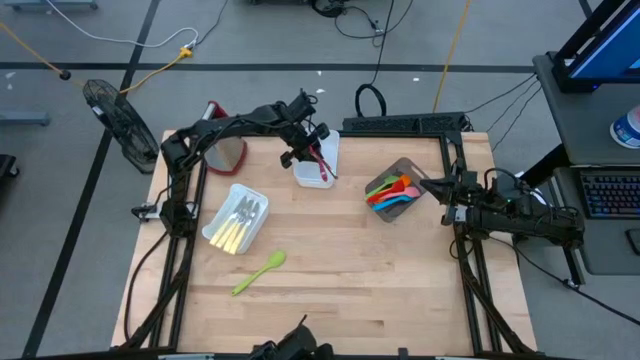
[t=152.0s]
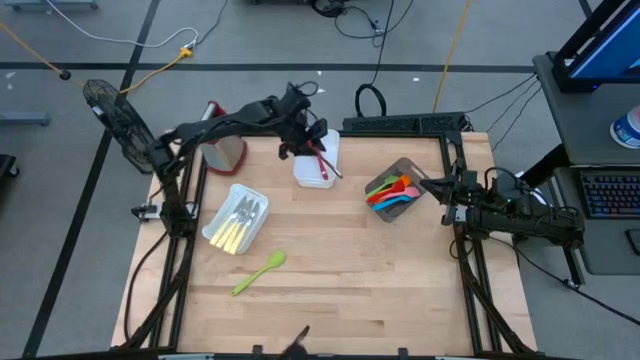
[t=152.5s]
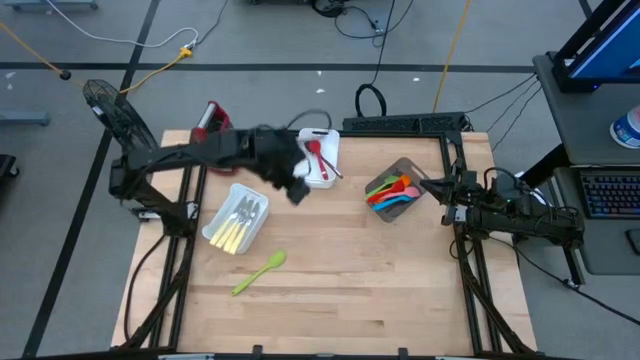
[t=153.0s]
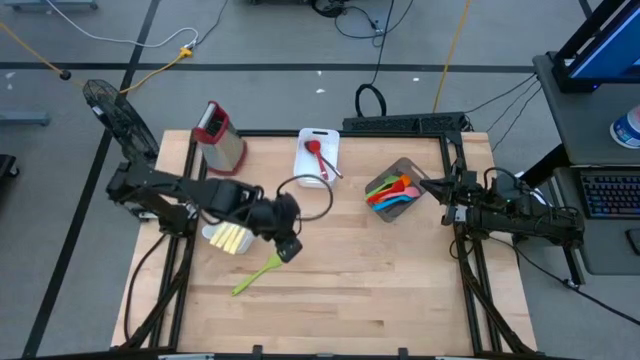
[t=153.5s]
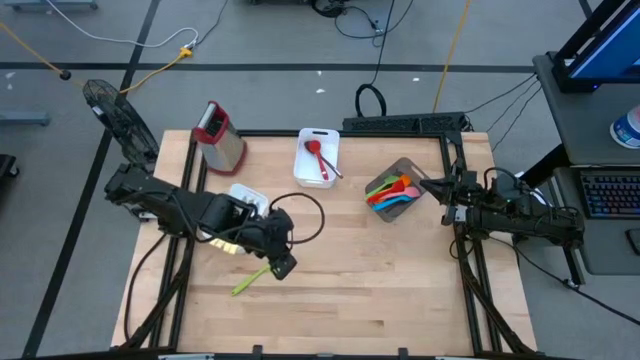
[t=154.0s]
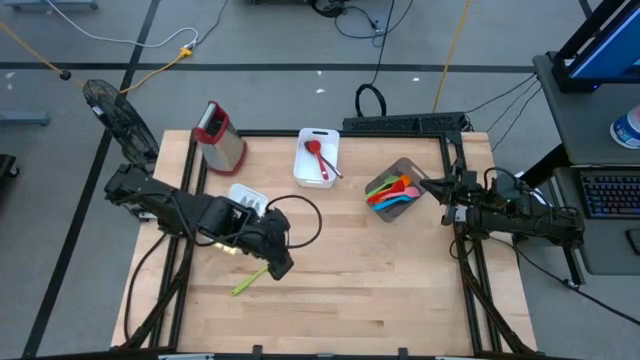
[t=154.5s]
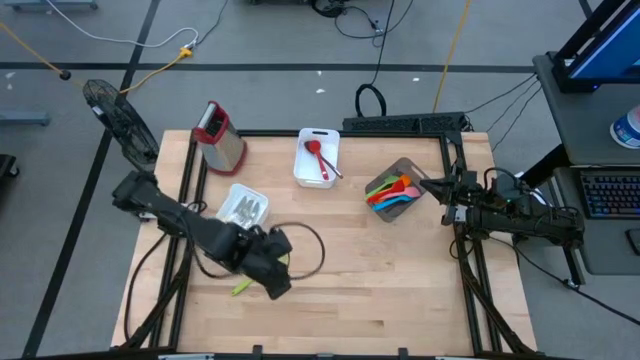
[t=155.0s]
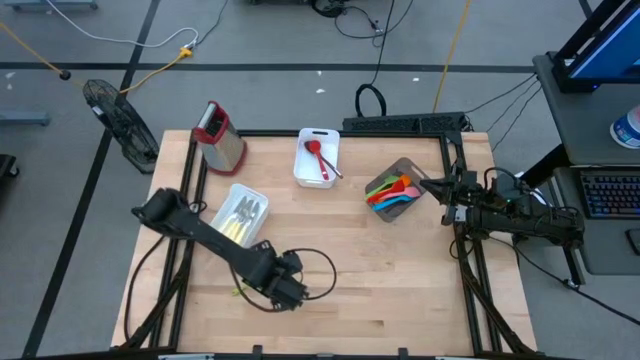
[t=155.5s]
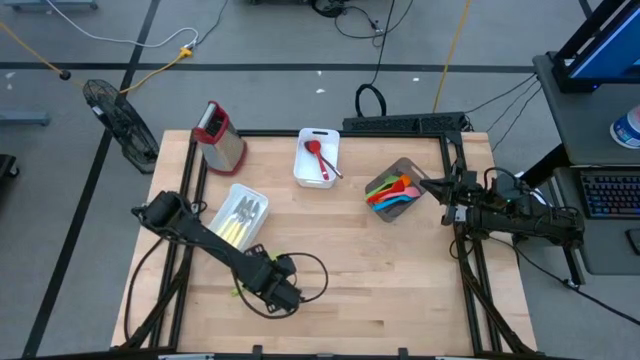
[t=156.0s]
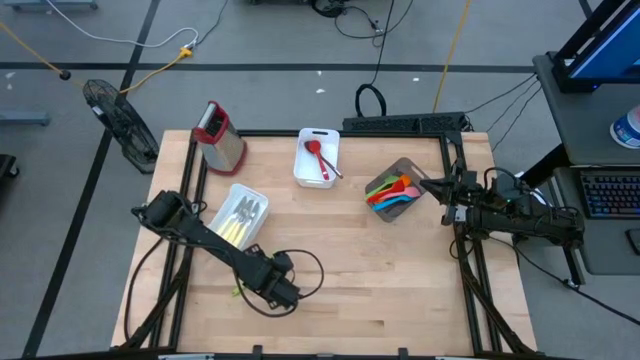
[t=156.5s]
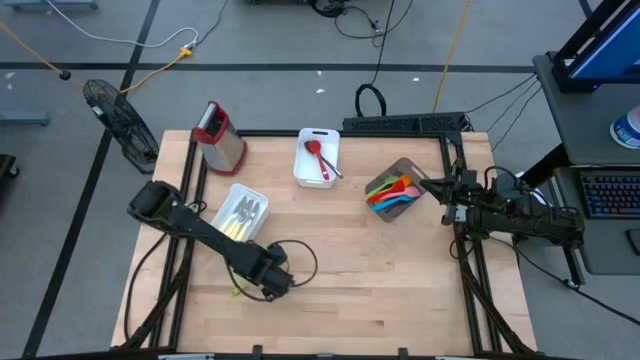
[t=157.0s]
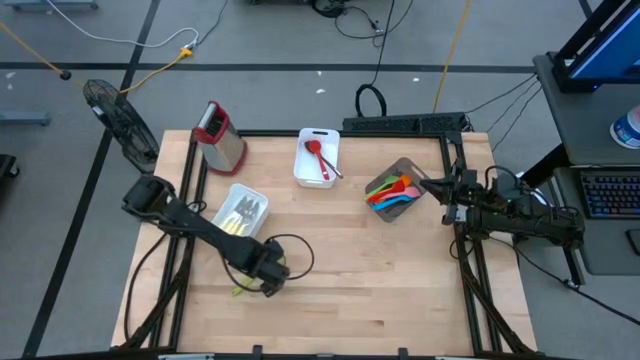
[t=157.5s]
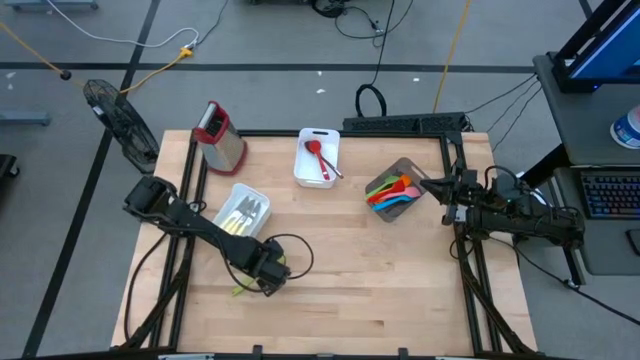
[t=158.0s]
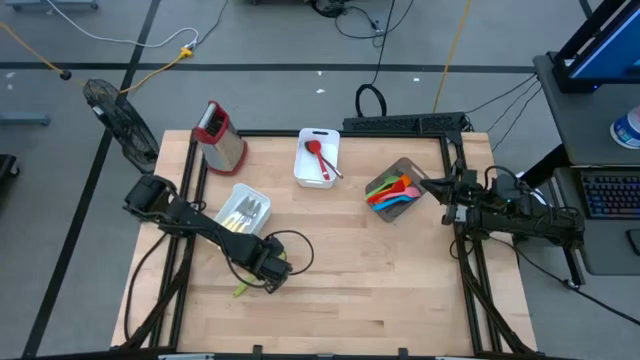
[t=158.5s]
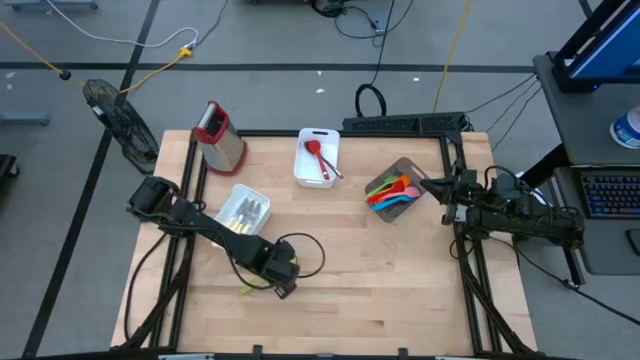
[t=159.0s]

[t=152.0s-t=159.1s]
Task: Pick & Place Kitchen Items
Put the green serving spoon into the top white bin

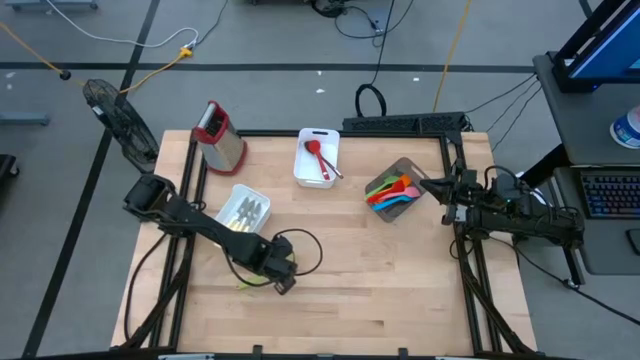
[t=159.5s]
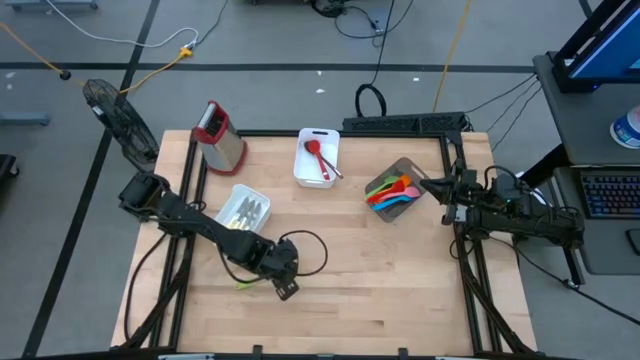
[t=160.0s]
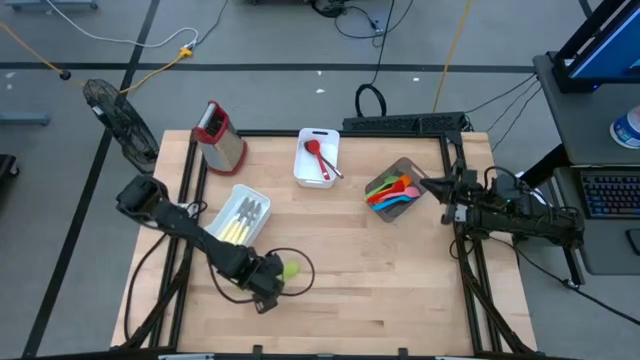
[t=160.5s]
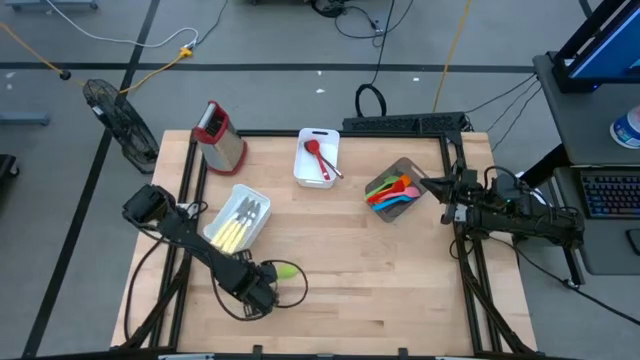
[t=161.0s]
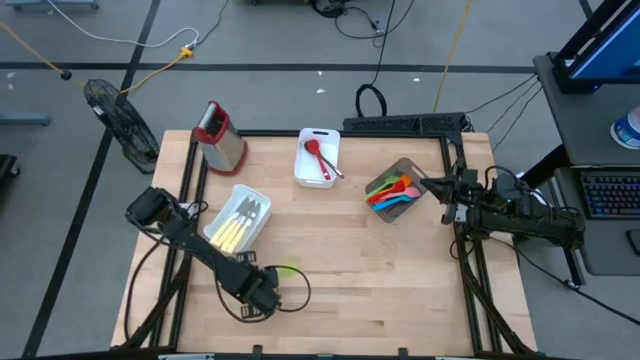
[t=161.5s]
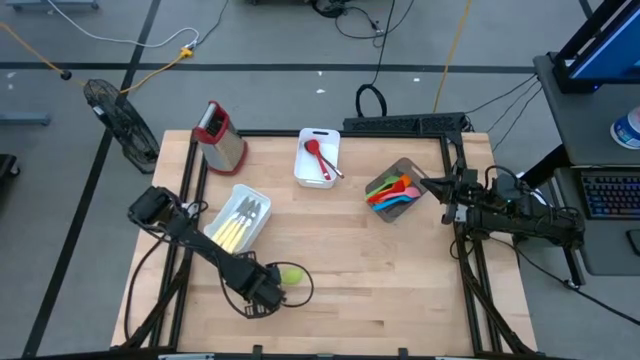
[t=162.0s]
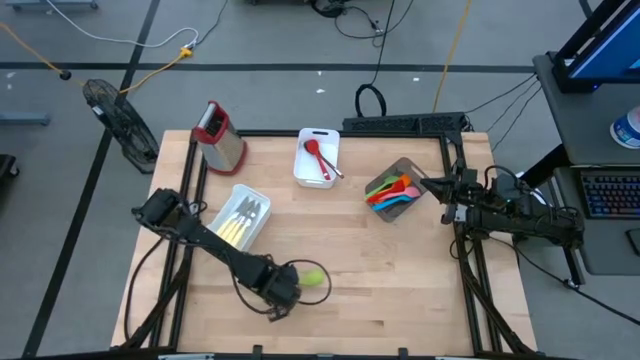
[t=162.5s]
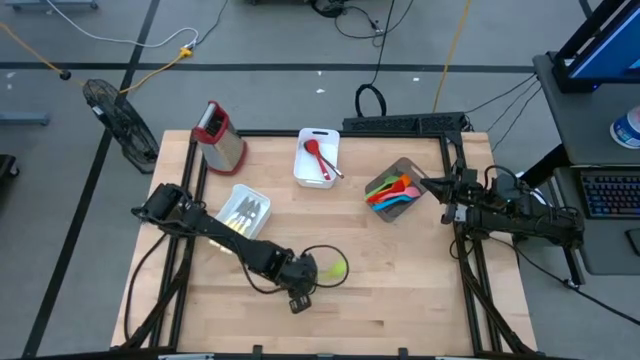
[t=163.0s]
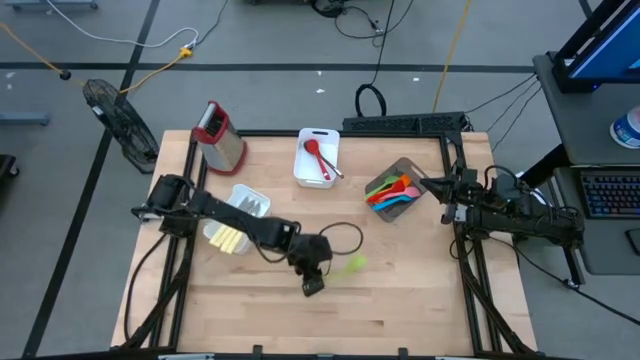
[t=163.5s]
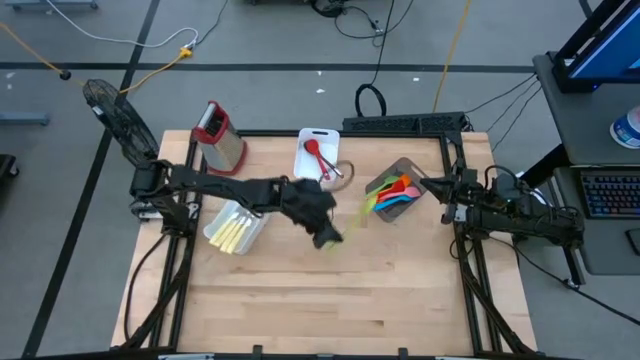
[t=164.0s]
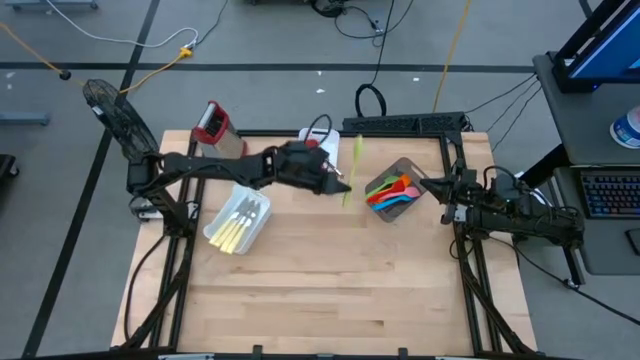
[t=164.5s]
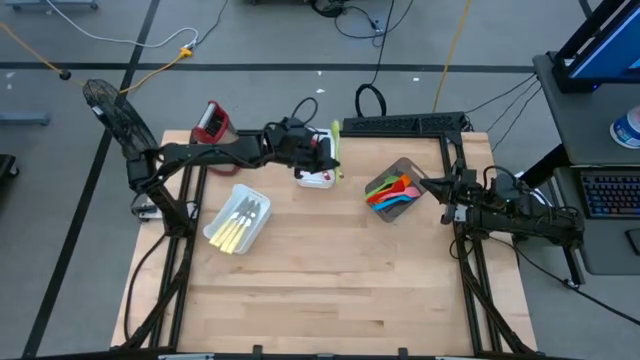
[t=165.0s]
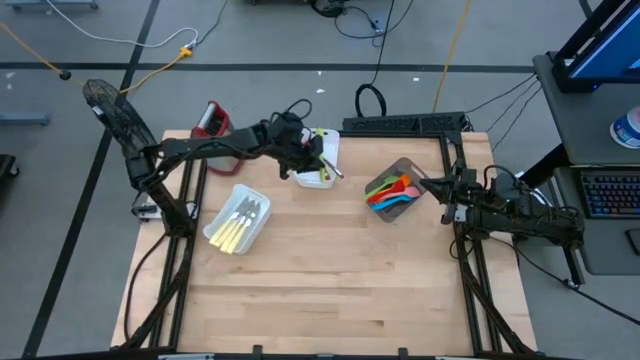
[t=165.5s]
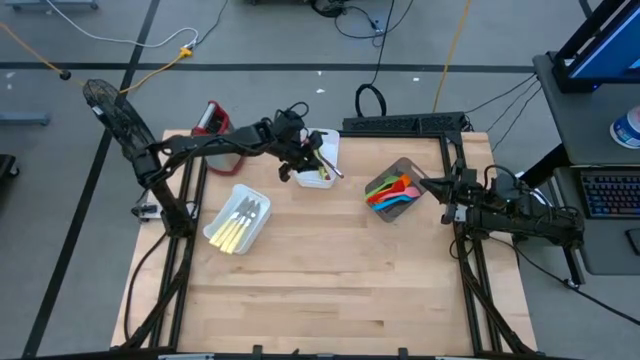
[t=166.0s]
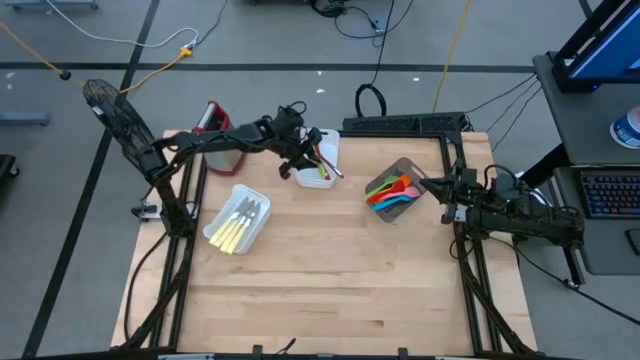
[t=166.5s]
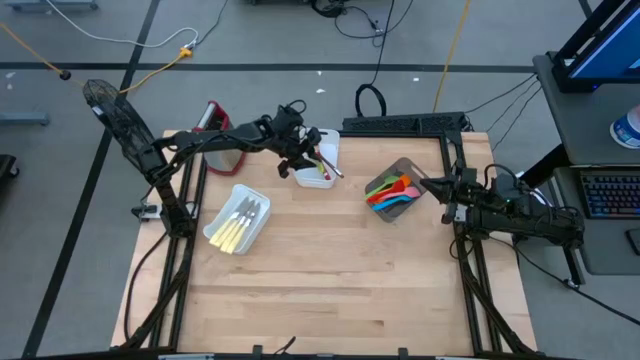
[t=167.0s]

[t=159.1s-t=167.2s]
Put the green serving spoon into the top white bin

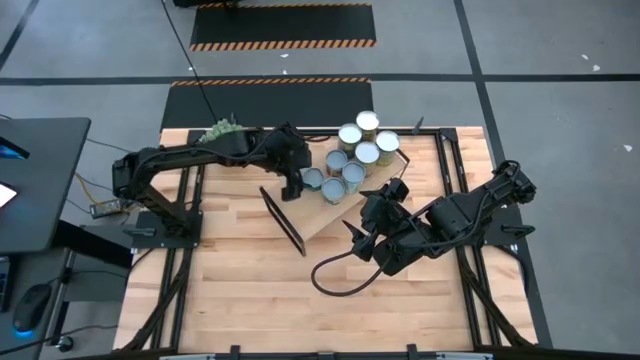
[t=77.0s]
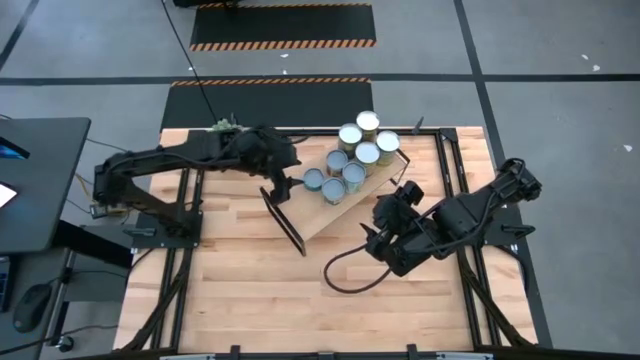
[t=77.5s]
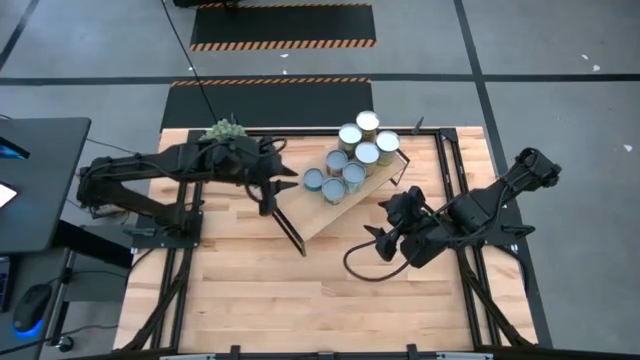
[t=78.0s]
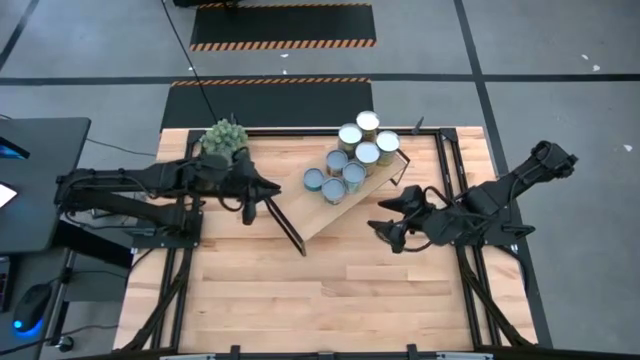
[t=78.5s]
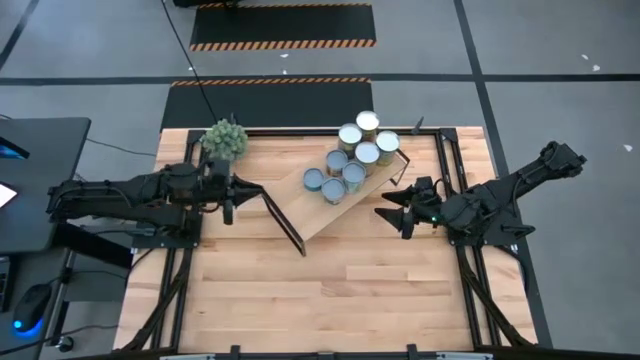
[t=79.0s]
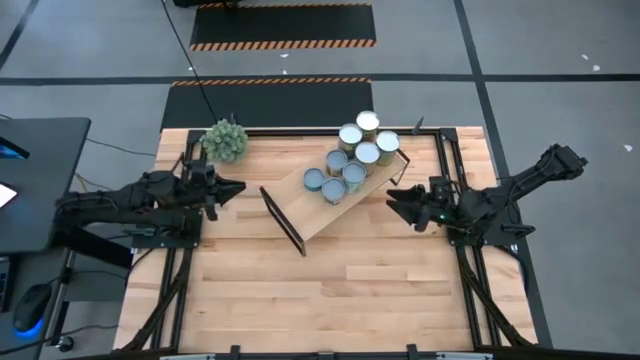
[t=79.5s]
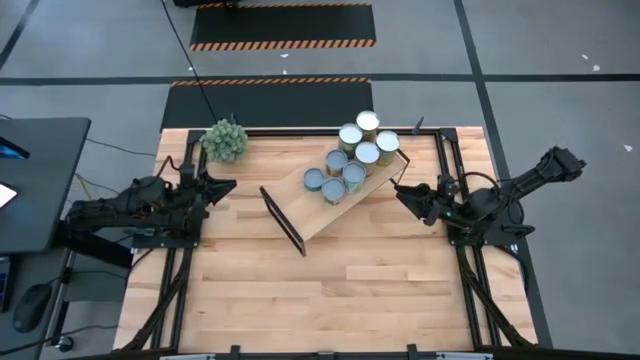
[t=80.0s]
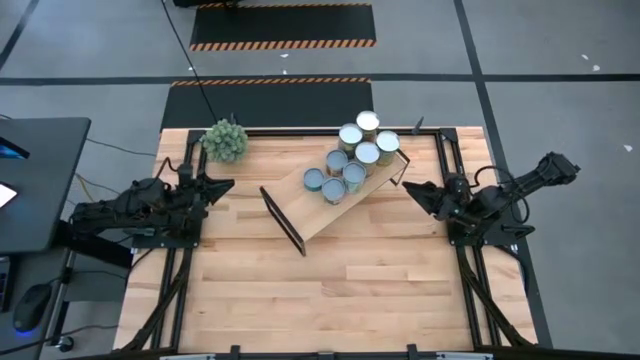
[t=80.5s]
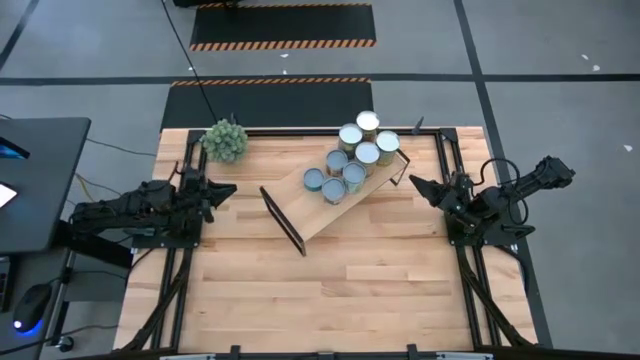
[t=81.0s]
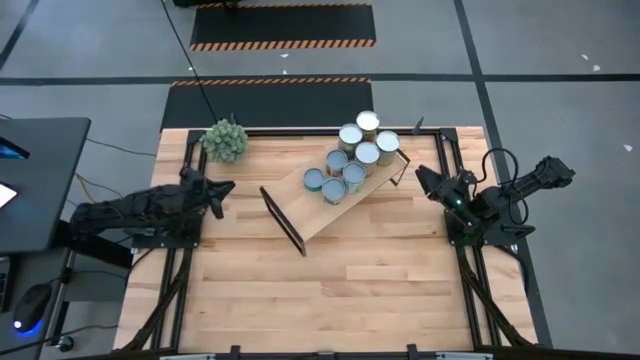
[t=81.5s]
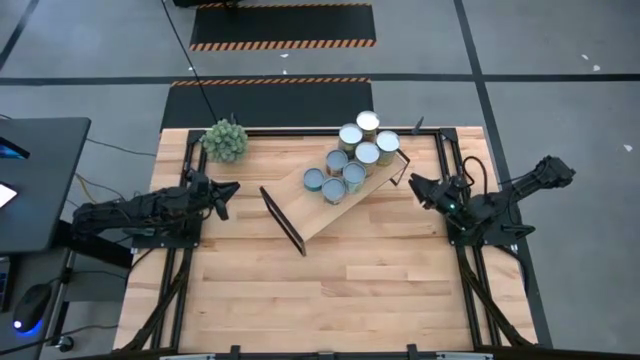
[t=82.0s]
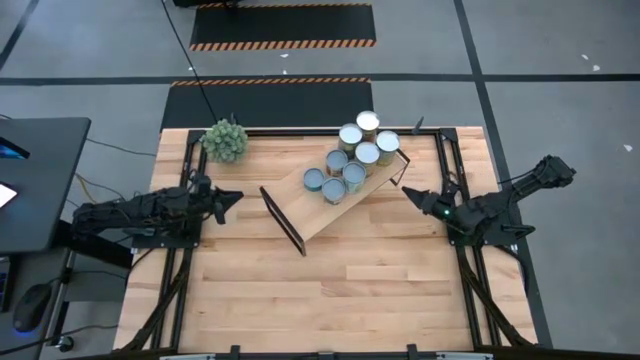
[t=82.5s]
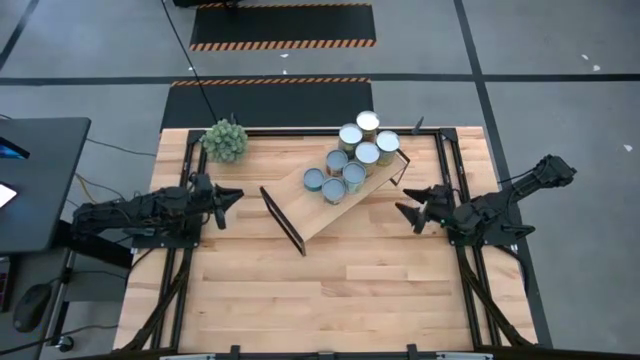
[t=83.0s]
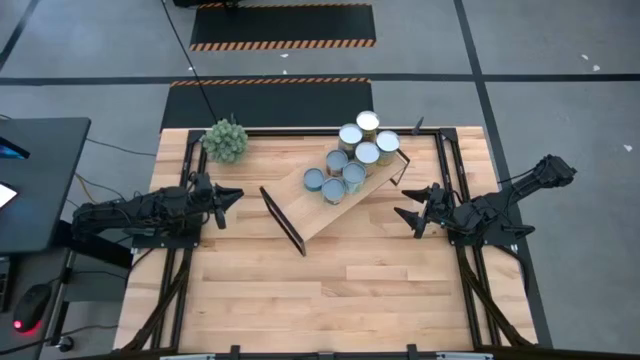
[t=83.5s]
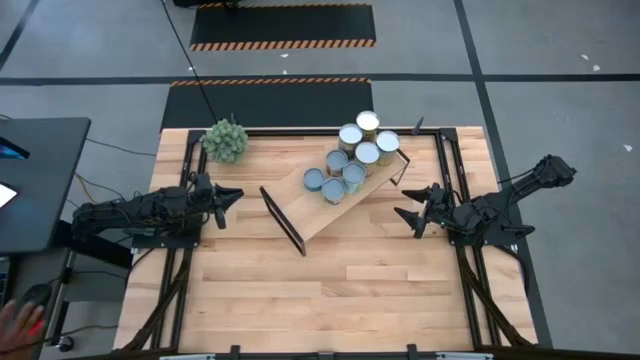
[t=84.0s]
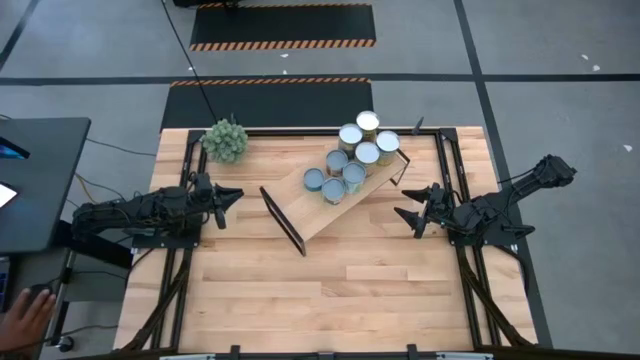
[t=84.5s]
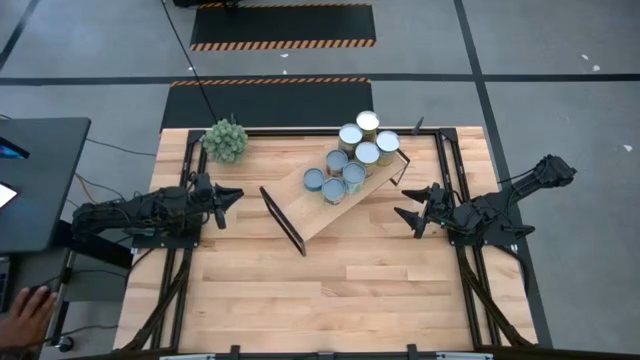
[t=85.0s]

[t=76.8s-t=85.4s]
Task: Pick and place cans onto a shelf
Return to Home Position
